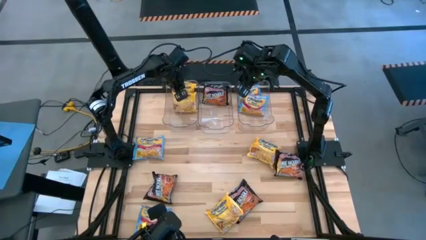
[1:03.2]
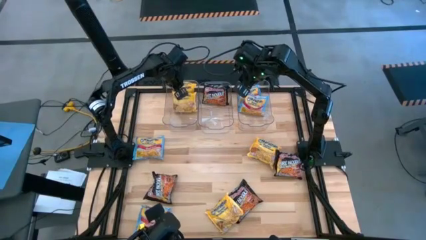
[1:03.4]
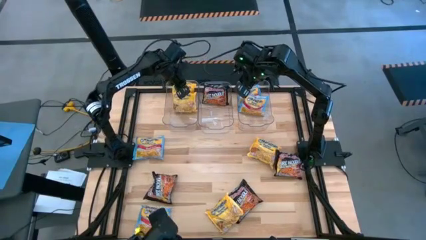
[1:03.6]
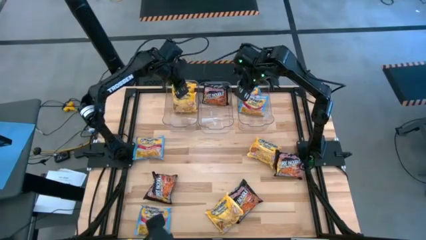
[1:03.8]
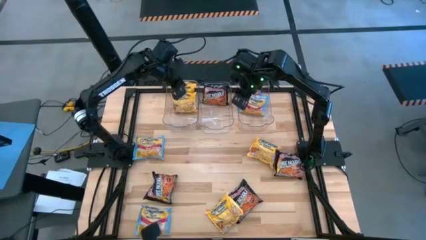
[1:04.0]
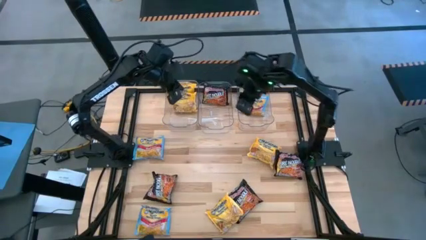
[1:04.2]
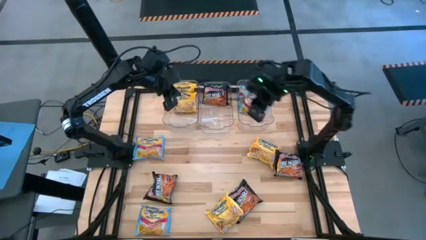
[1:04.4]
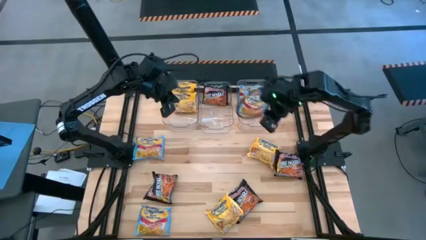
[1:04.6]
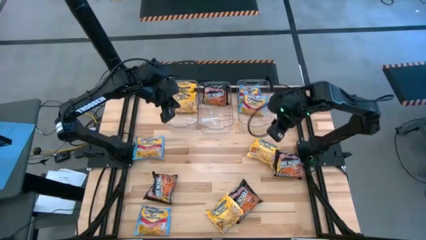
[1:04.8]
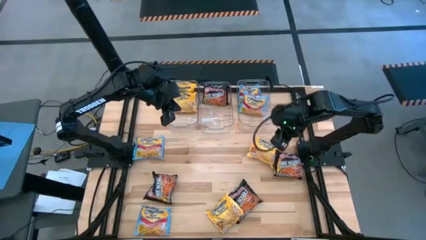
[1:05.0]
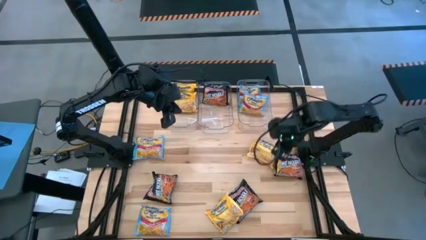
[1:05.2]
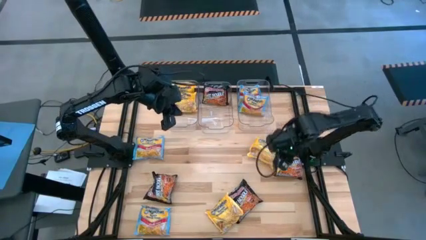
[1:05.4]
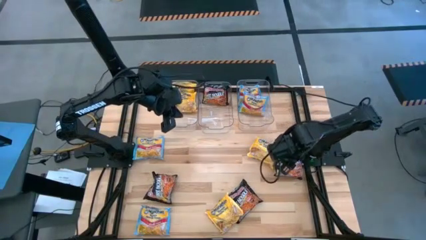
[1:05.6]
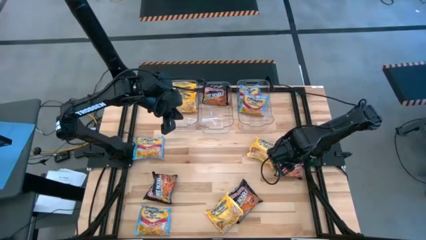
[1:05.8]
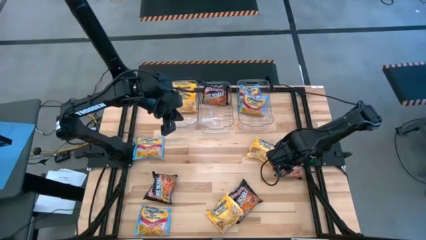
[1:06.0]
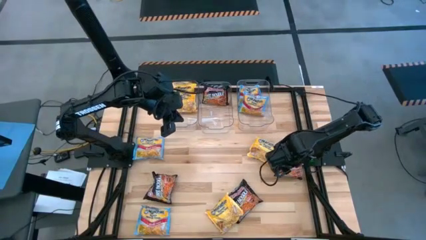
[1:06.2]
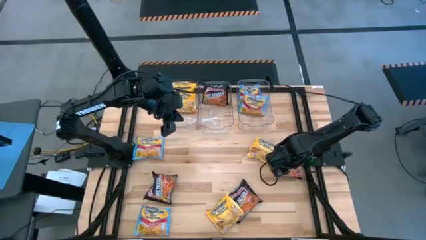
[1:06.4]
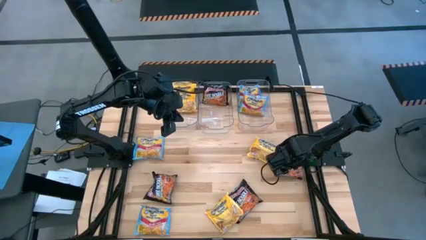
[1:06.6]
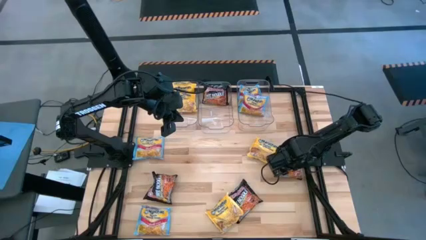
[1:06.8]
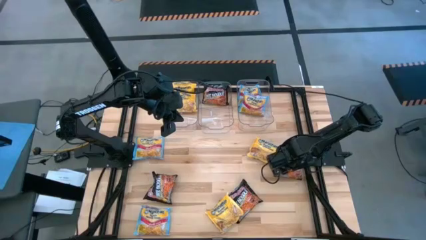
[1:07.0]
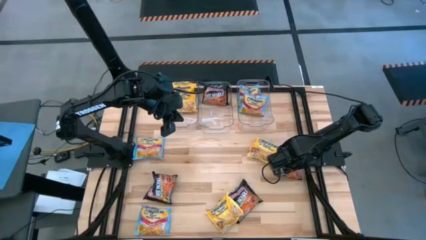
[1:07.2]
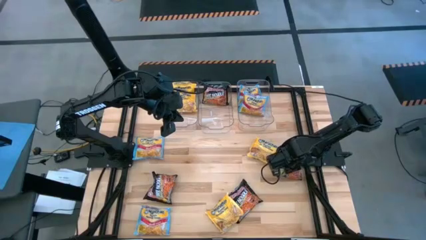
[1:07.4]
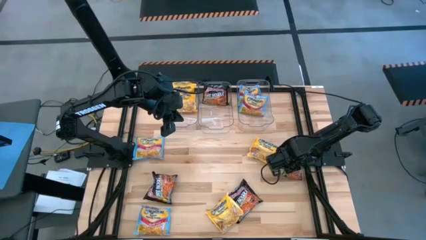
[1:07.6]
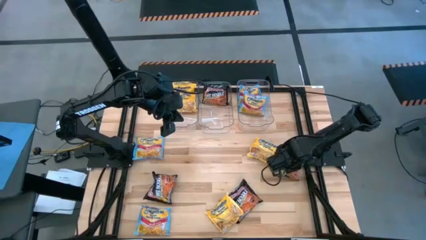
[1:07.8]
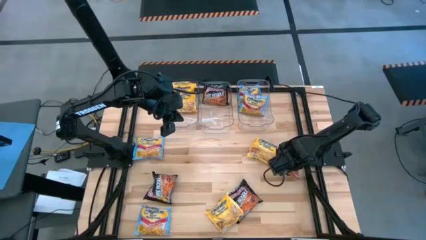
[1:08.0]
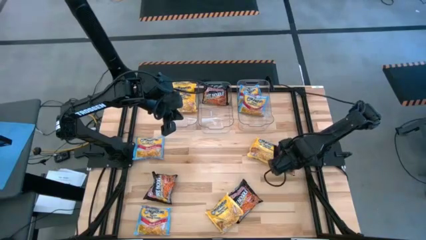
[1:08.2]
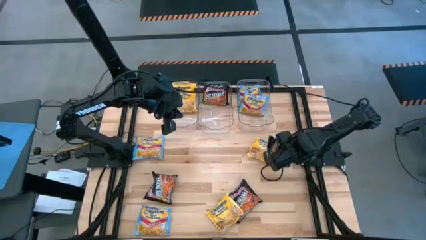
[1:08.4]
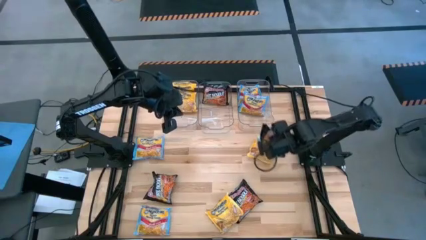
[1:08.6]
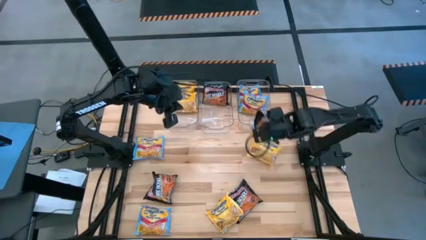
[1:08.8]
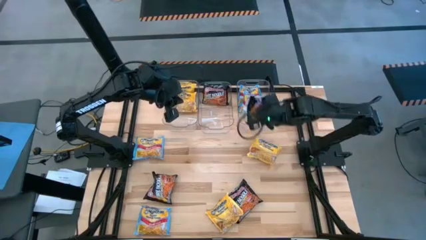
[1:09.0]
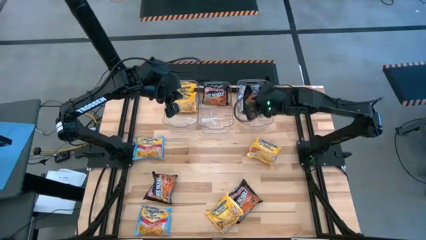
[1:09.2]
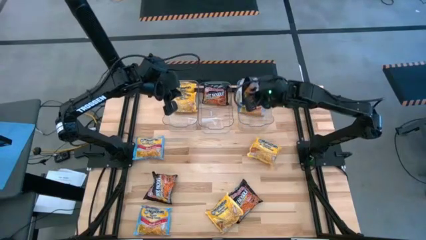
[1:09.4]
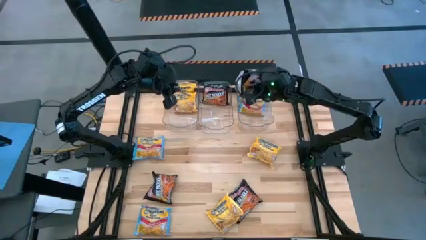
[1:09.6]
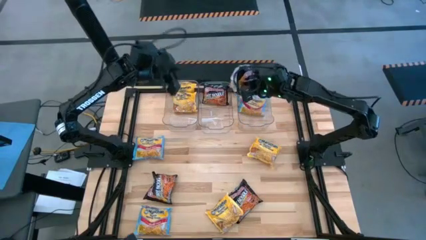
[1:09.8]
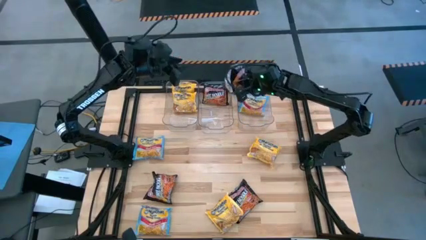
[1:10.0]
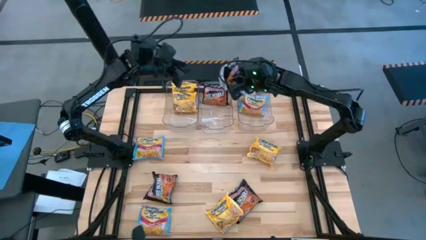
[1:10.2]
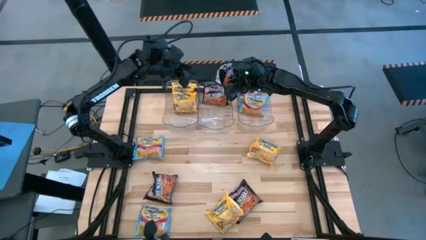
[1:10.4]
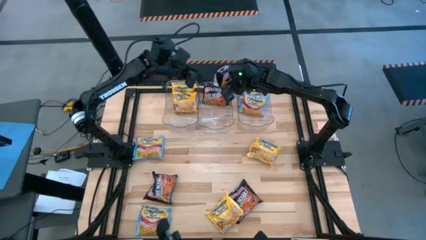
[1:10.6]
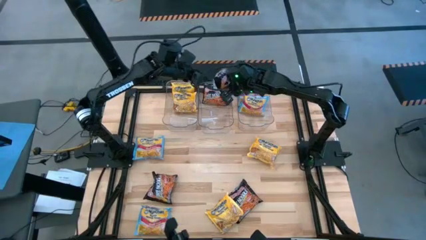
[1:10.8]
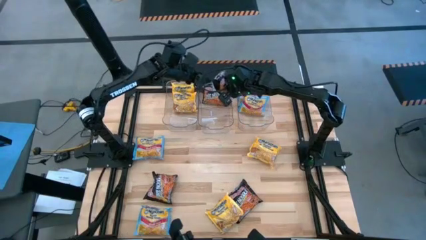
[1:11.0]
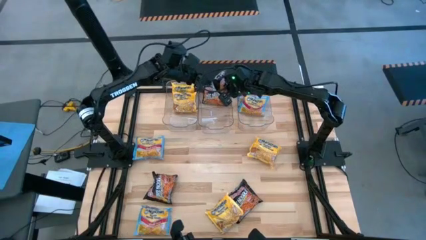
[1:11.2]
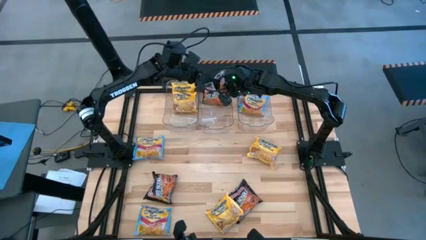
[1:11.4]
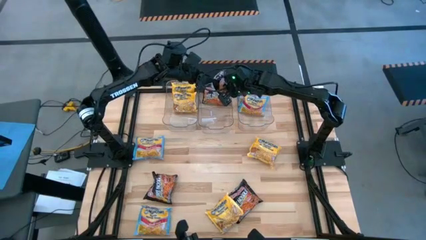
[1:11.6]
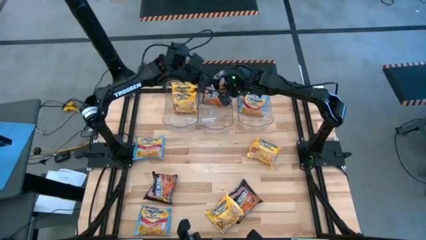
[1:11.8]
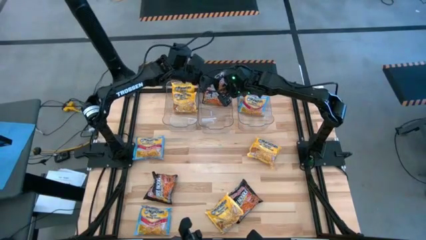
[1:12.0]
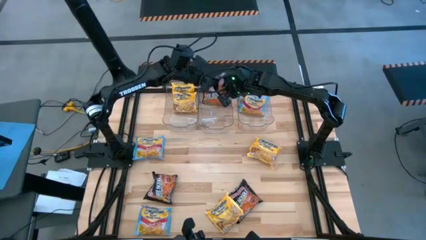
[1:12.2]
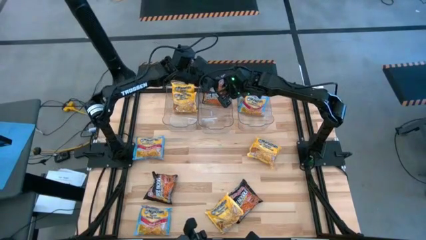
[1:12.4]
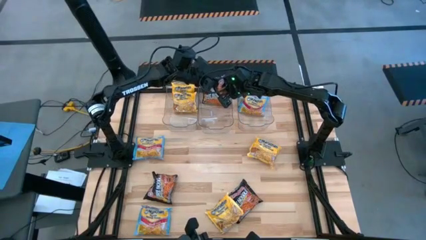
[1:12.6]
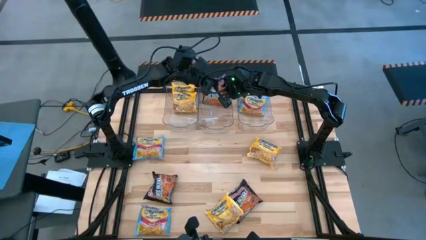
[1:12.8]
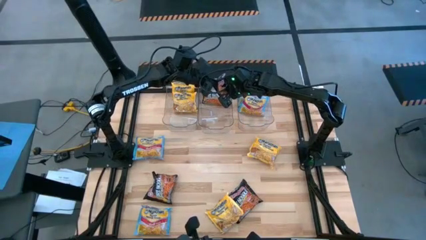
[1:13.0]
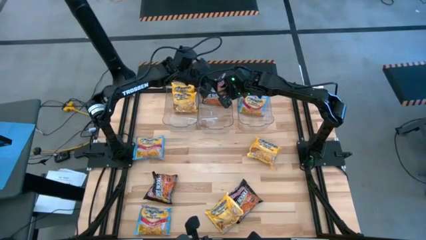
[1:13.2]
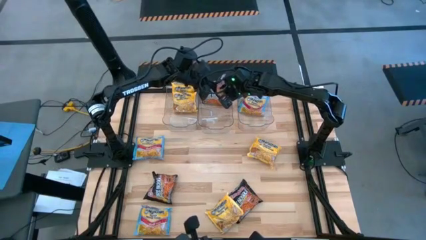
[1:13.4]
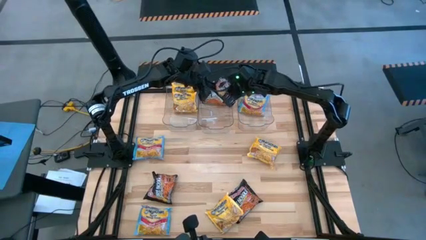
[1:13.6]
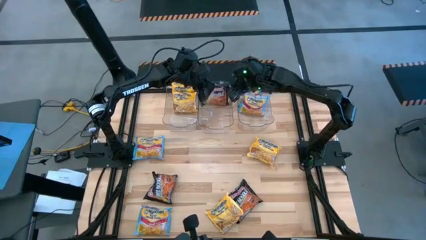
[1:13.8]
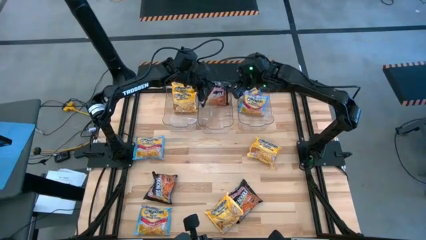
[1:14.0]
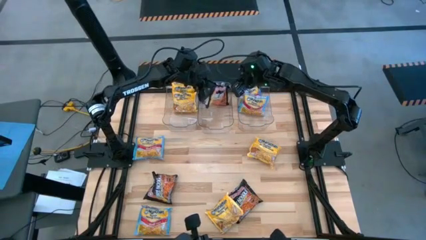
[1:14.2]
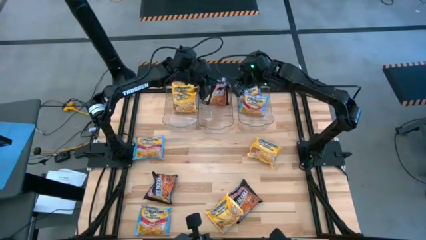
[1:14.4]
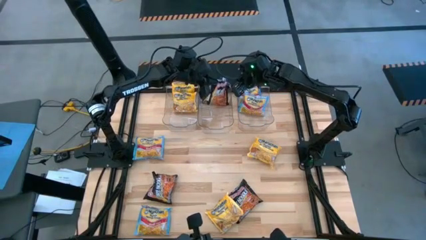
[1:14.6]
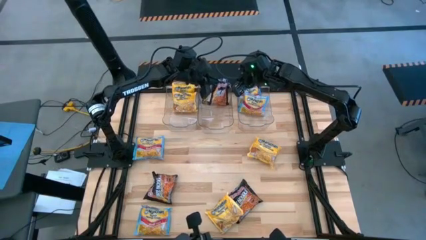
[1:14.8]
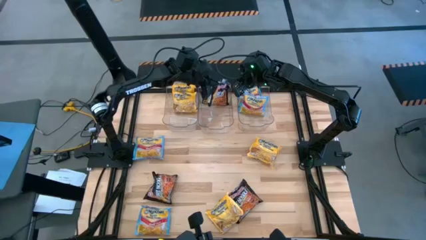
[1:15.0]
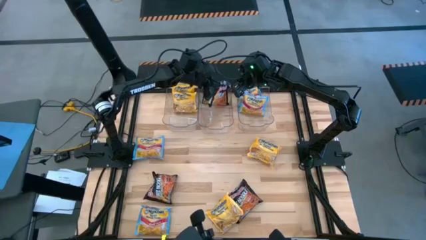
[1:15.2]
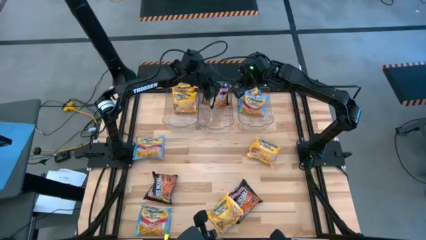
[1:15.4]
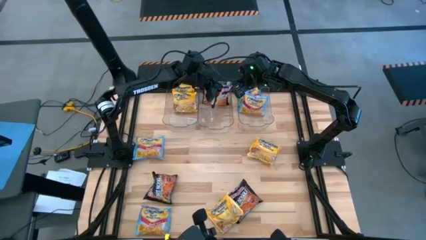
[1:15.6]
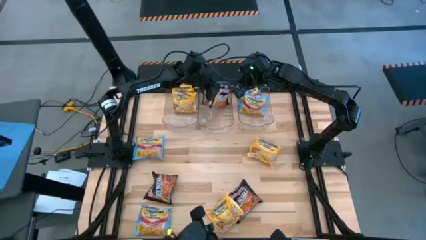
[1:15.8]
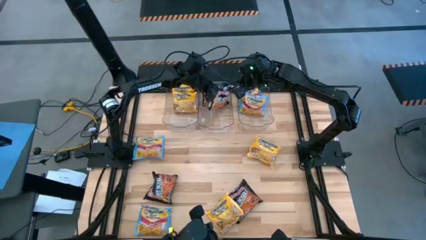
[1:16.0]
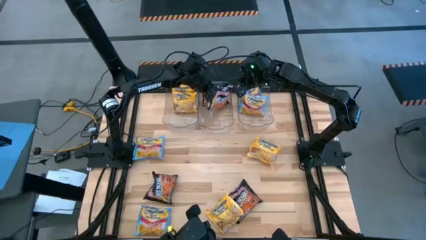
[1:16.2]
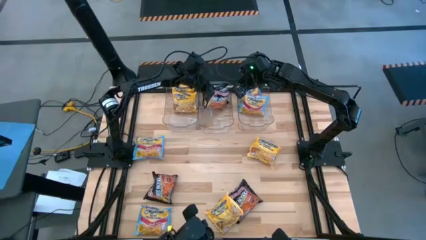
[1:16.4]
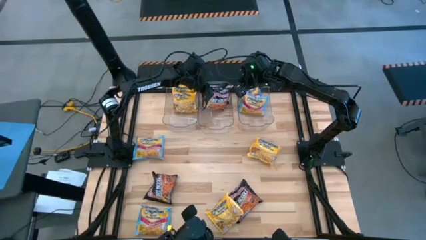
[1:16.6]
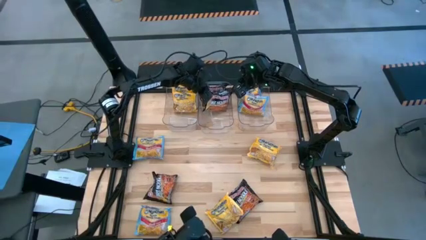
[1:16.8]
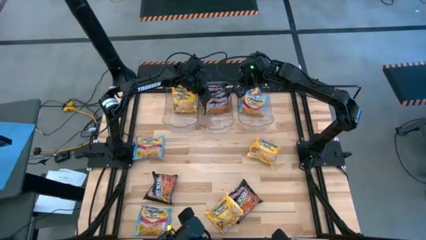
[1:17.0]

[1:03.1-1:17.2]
Task: Sort Maruchan noodles
Put the black noodle pack in the middle transparent bin

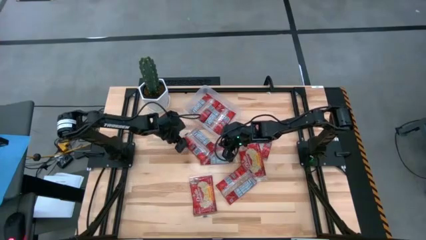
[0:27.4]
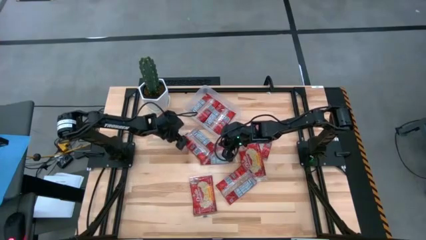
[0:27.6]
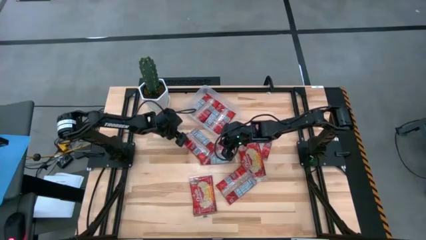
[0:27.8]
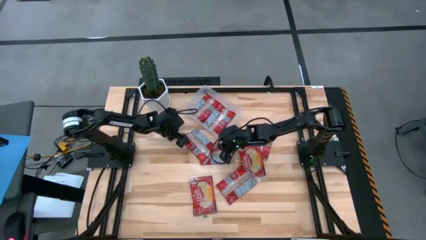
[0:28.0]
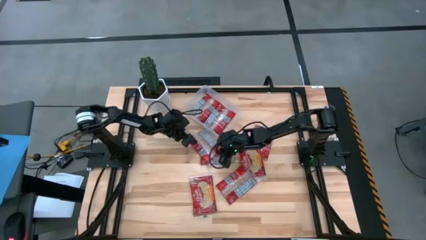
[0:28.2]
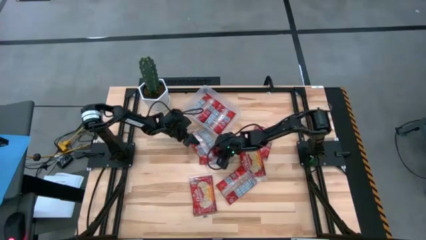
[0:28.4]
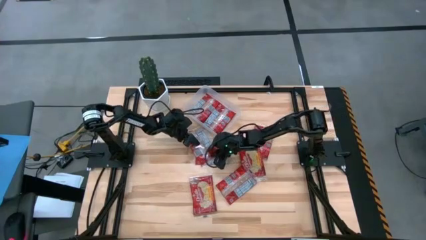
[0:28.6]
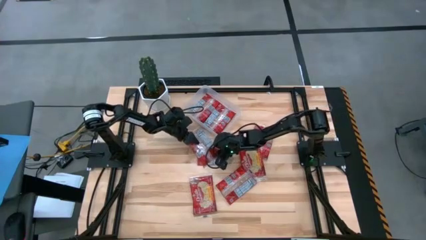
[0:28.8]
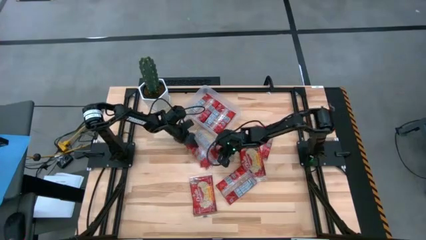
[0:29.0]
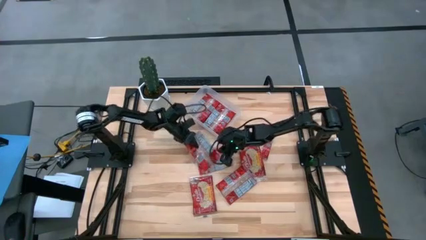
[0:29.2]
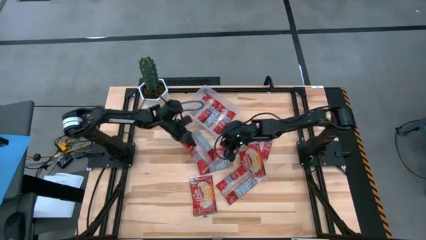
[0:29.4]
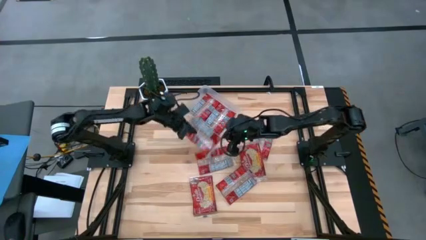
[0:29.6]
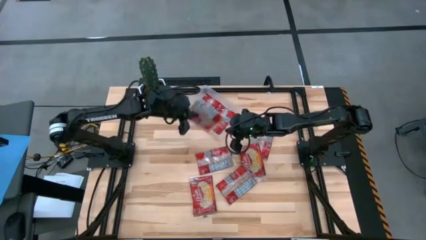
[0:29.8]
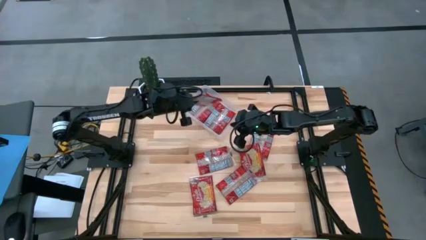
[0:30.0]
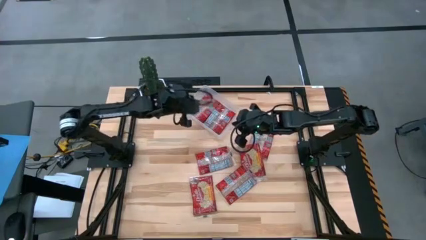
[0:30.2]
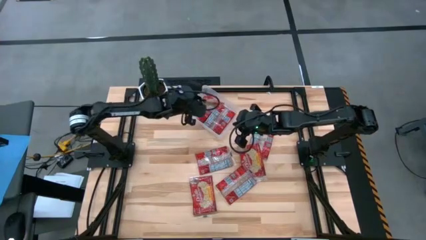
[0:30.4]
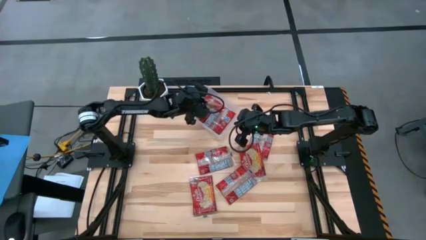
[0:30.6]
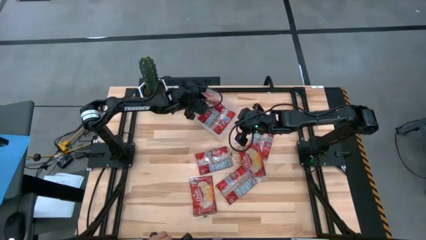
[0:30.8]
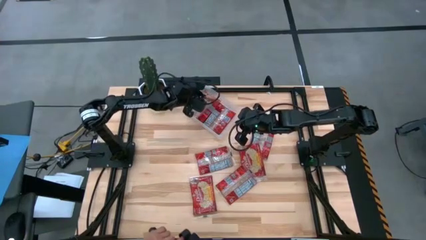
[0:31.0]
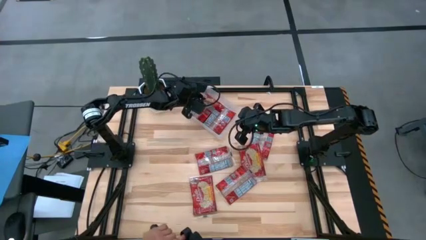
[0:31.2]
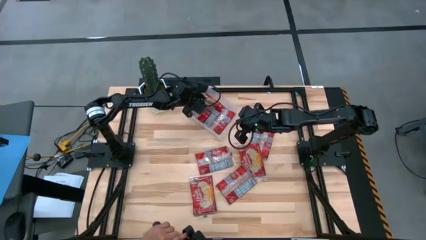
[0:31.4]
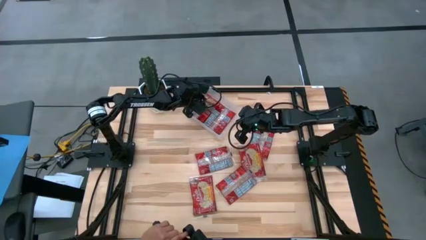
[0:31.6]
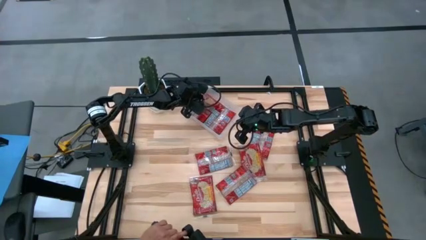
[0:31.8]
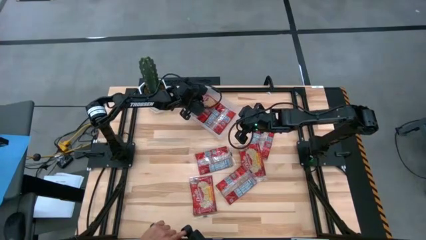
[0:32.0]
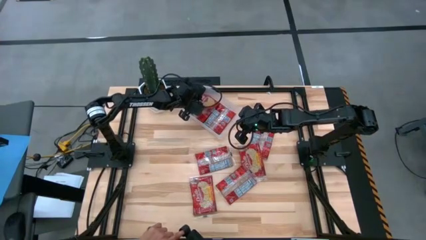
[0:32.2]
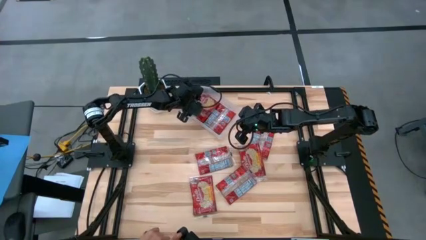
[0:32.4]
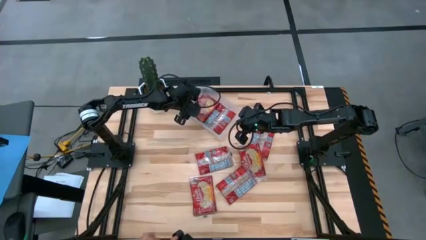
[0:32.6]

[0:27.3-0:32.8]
Task: Sort popcorn bags into baskets
Put the red popcorn bag into the transparent bin
